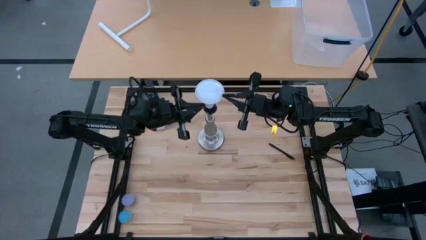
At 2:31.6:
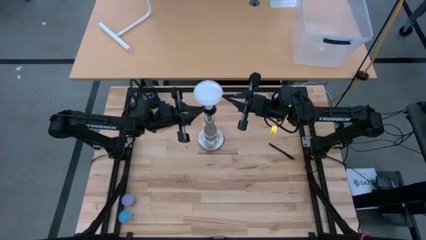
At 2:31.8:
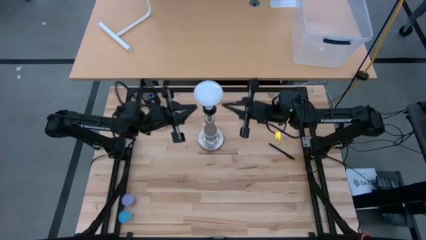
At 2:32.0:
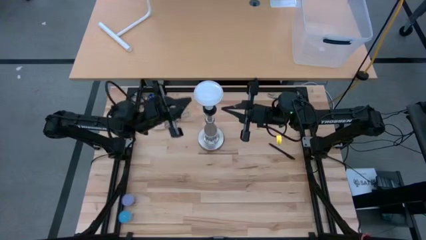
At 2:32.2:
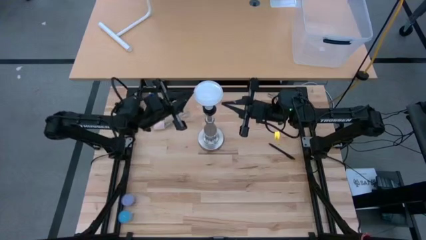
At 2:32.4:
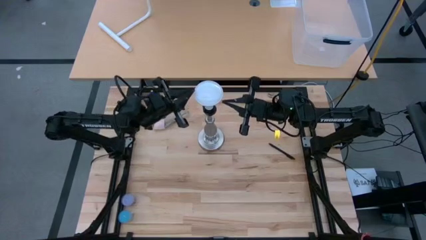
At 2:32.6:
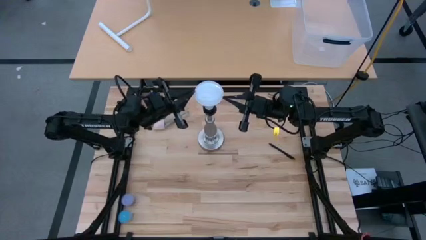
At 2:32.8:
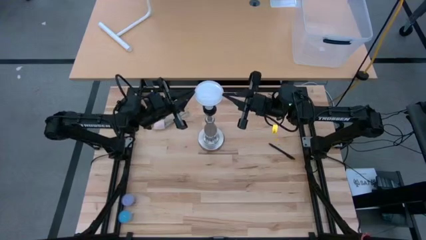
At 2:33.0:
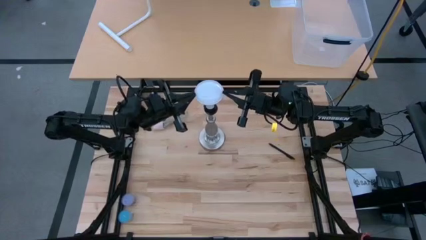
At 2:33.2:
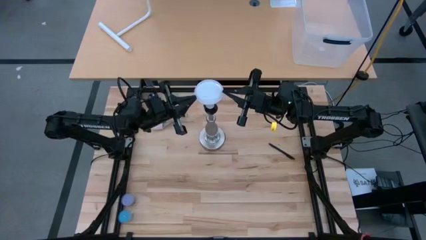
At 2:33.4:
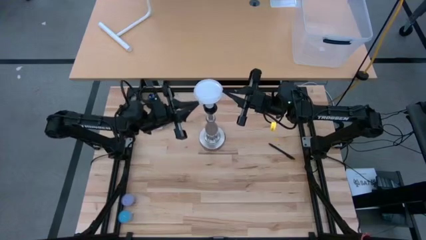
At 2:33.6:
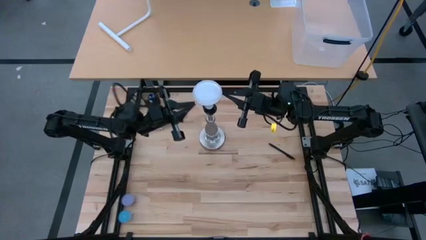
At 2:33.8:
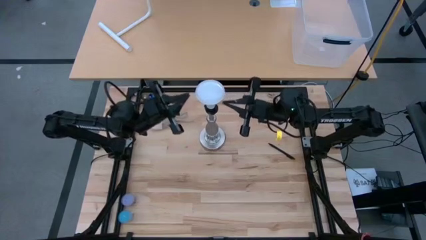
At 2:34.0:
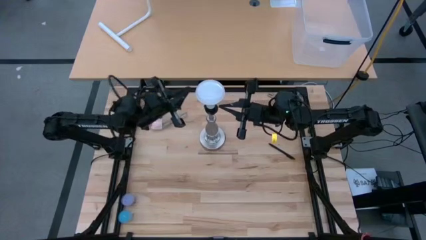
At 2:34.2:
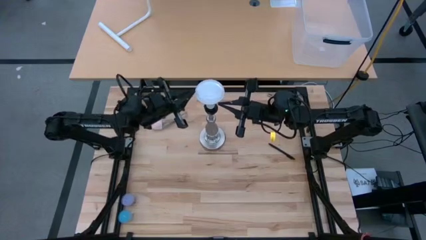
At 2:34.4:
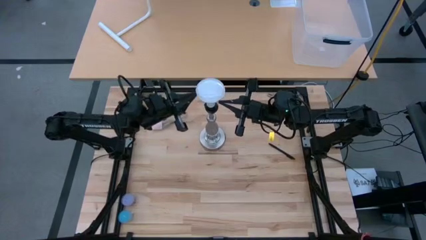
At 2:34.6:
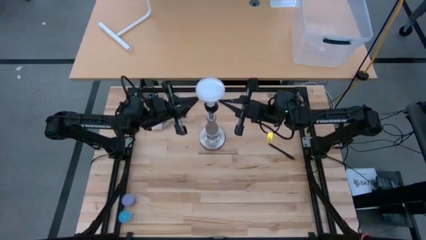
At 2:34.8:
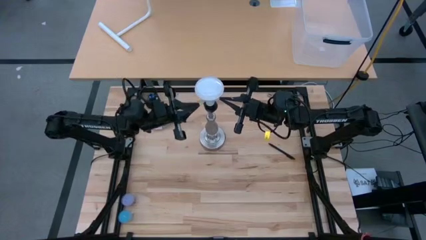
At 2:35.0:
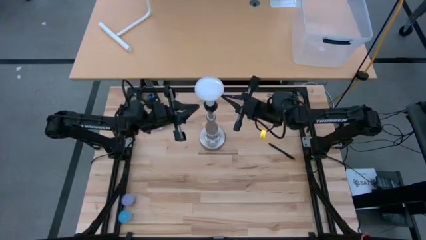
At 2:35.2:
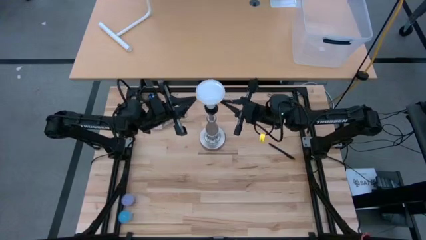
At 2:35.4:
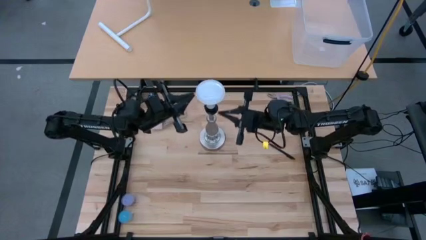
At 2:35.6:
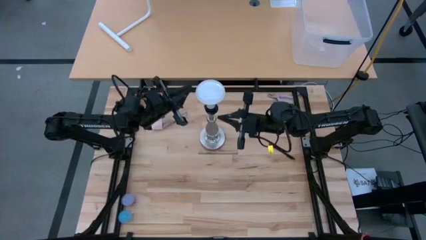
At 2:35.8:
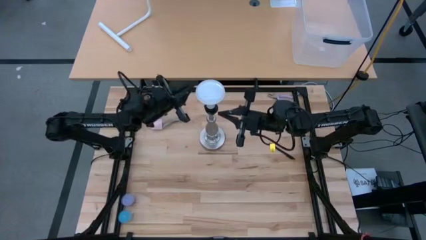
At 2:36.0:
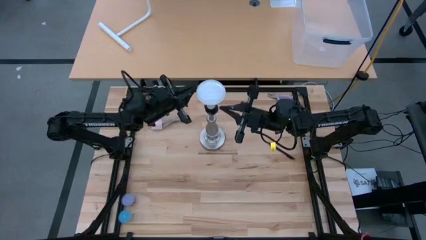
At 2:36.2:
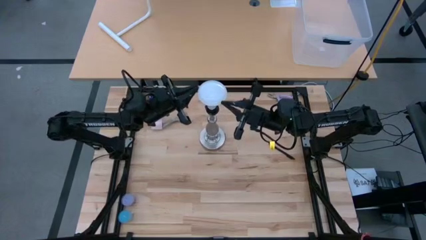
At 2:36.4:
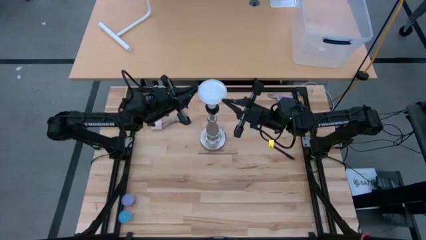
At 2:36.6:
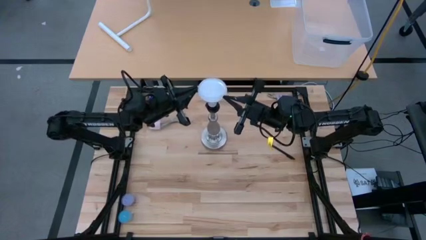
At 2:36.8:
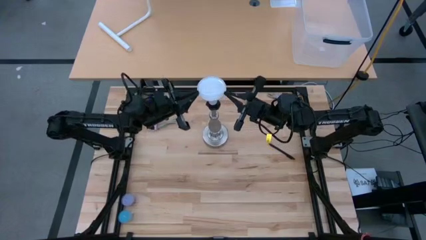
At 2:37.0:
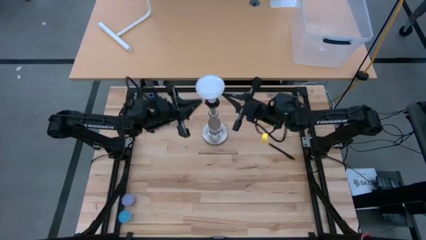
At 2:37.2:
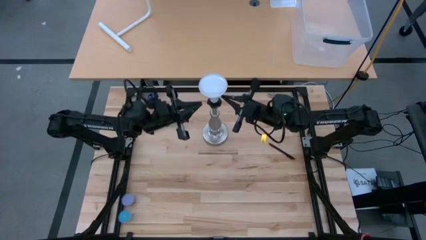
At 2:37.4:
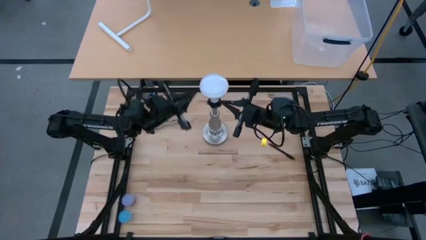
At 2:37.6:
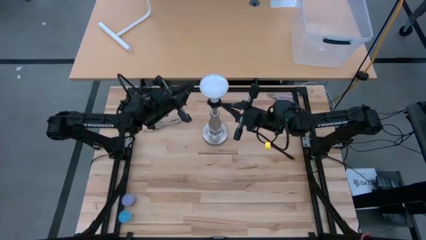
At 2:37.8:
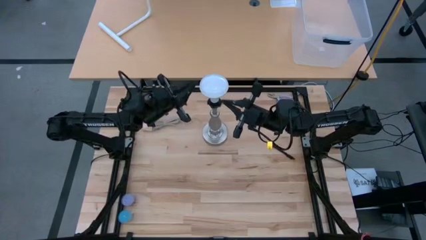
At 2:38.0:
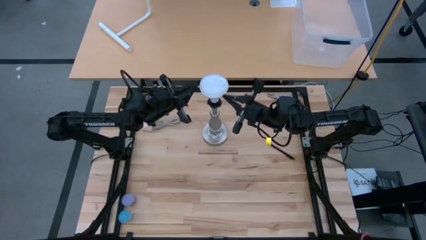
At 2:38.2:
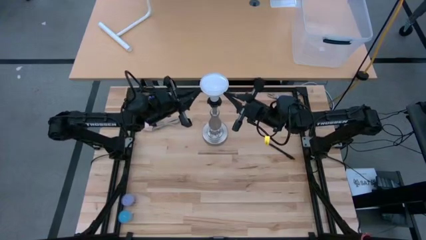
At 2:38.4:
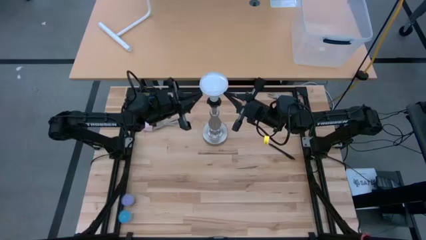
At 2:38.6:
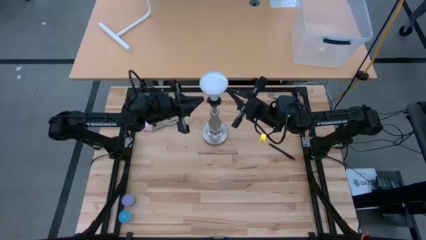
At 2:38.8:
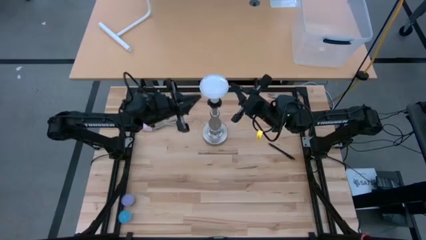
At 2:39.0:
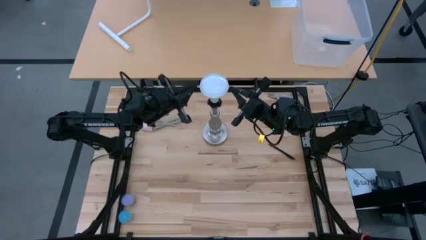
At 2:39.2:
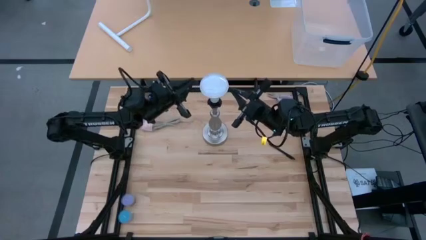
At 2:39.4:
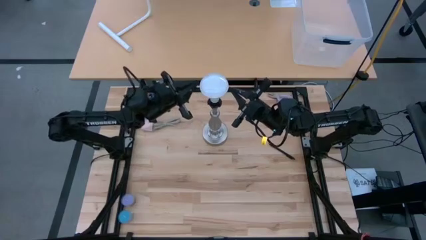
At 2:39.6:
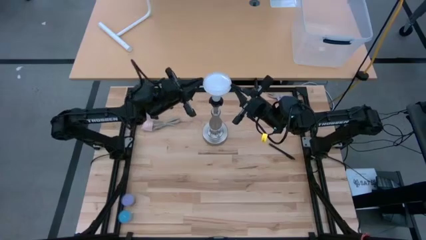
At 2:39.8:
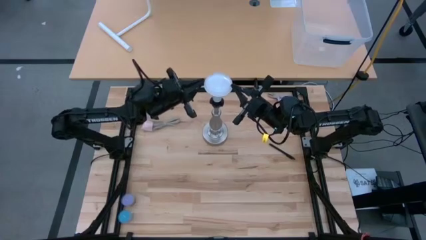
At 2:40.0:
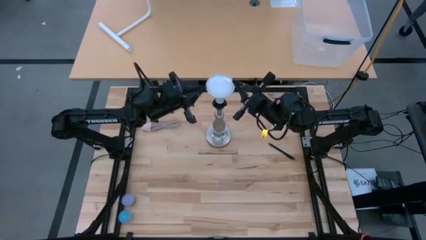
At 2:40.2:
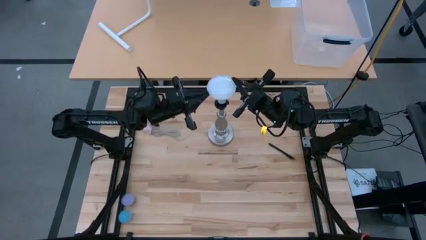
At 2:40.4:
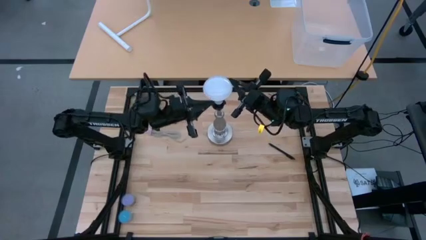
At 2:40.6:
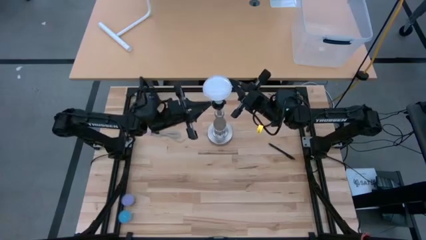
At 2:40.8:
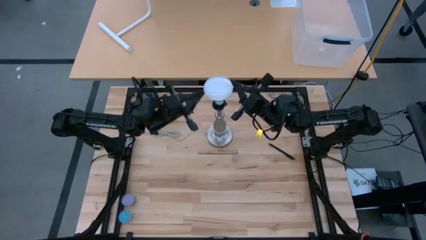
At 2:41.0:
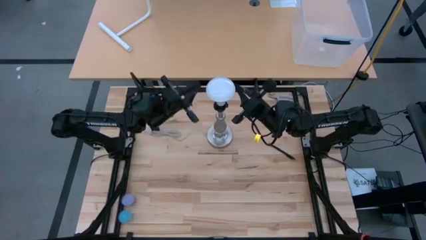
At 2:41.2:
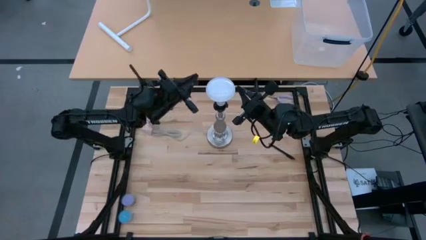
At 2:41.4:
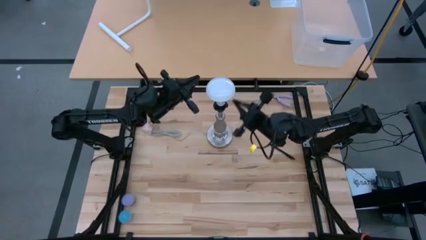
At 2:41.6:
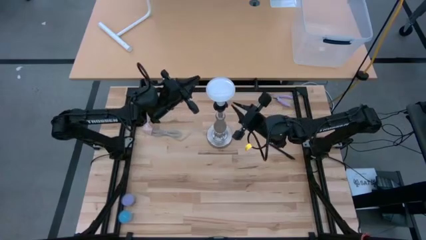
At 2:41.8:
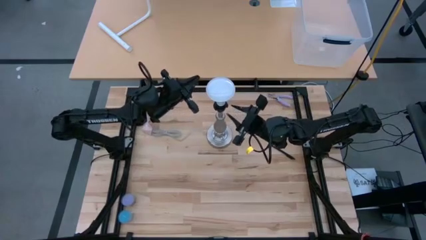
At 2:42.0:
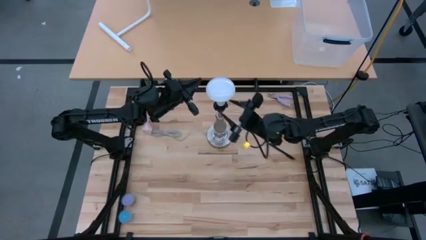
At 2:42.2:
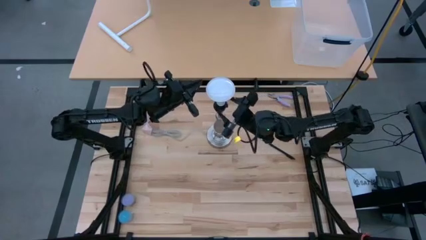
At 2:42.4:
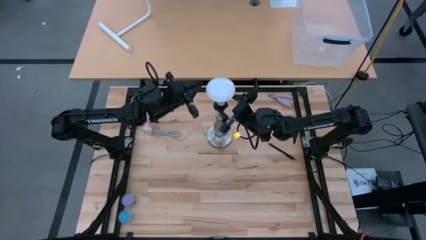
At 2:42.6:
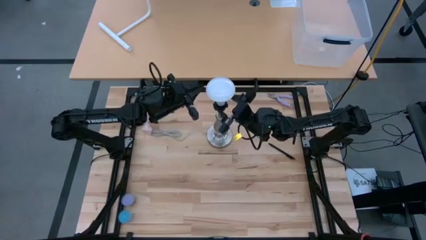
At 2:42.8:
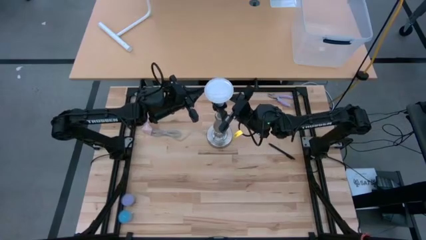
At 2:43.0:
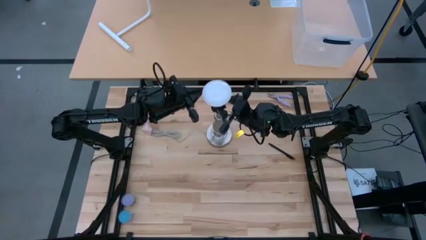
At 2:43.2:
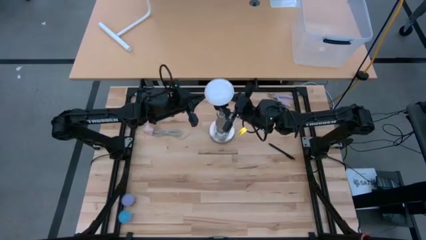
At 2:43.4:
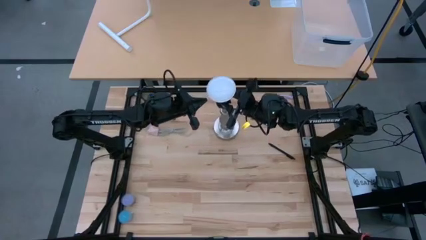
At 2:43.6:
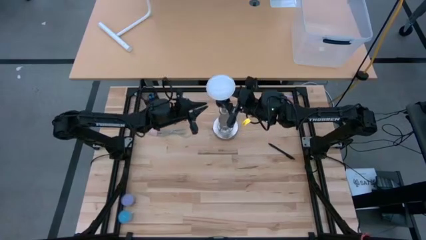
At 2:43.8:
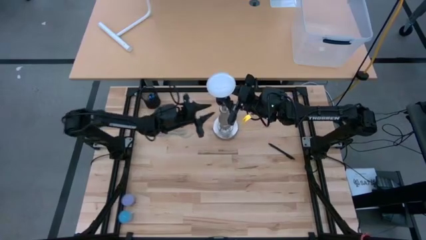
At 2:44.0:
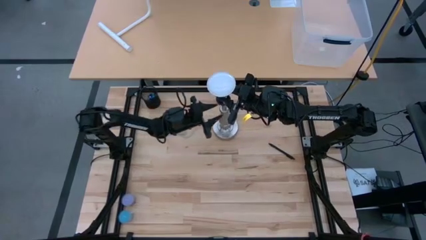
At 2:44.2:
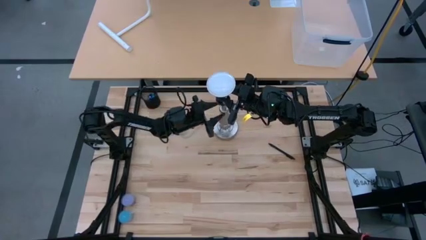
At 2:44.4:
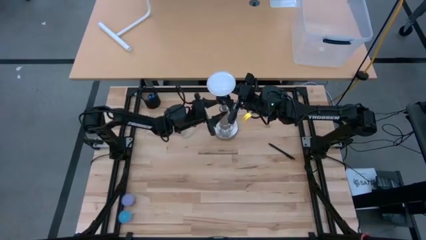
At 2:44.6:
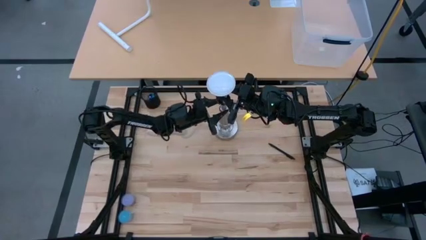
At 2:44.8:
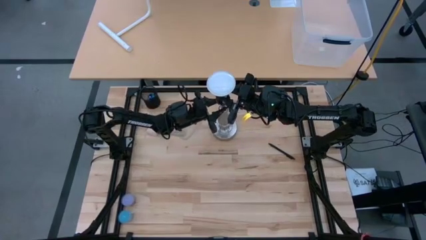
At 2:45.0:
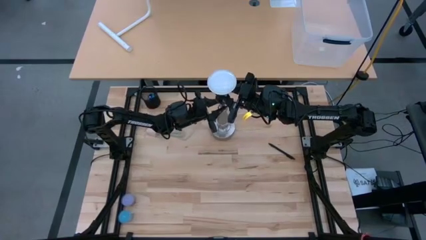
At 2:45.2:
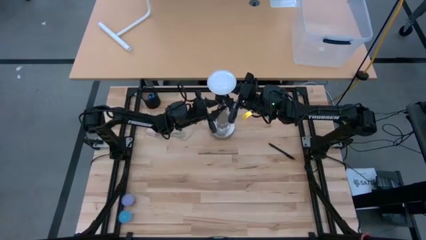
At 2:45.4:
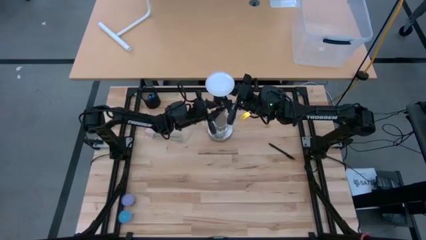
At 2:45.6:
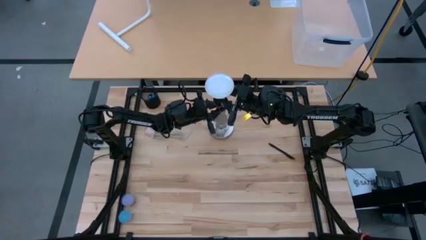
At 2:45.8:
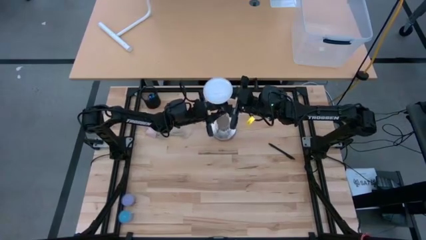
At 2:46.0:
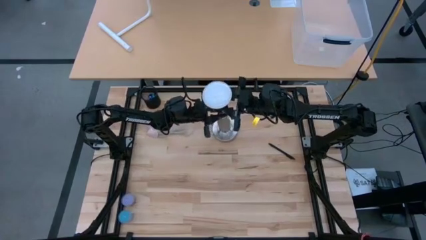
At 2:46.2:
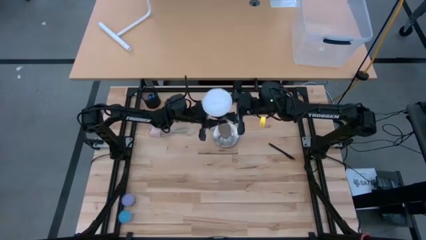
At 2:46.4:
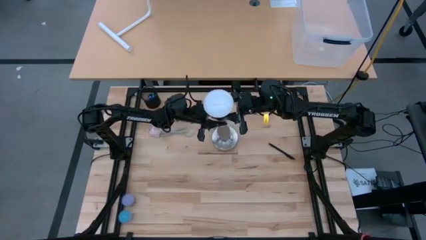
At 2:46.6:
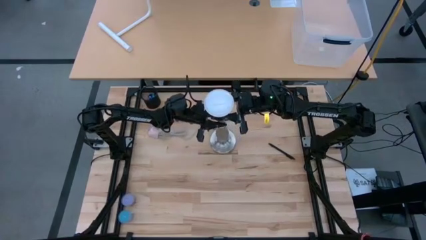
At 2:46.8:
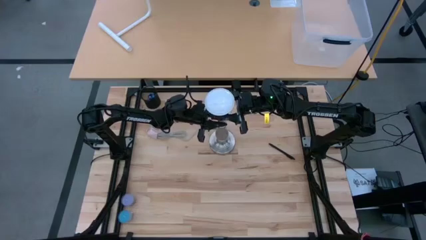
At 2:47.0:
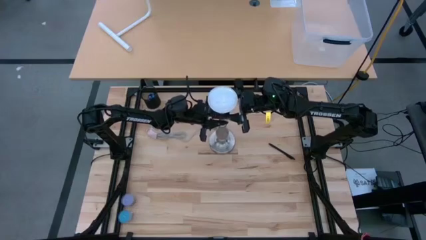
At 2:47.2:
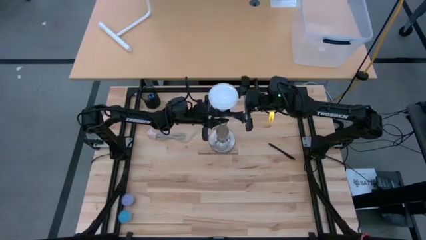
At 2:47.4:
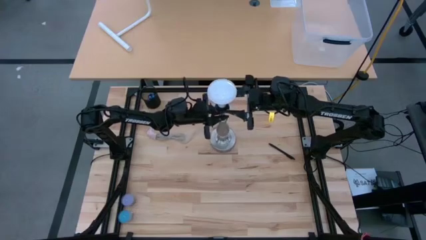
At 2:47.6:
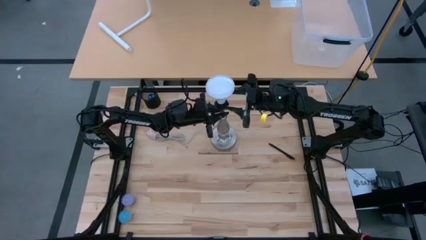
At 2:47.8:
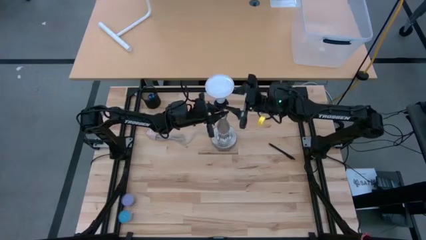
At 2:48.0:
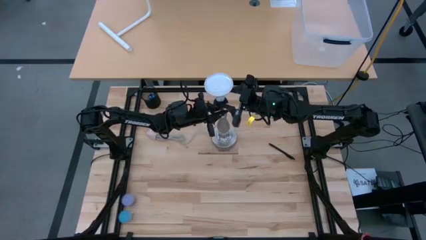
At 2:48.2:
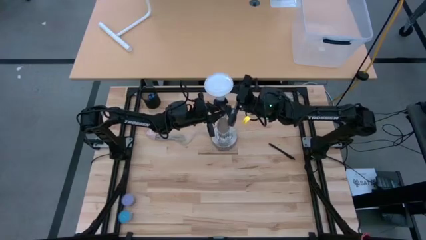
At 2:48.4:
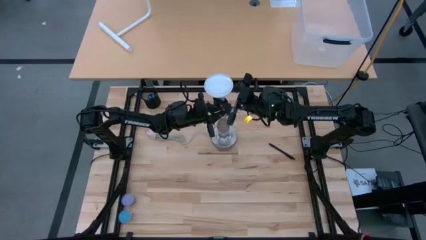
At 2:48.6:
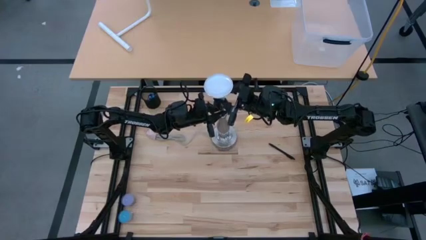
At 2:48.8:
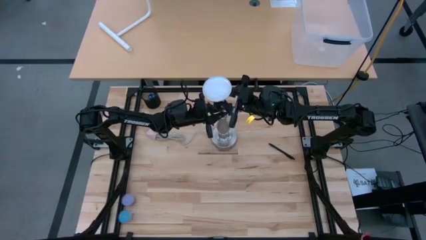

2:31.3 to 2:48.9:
Task: Screw lightbulb
Remove the lightbulb from the lamp
